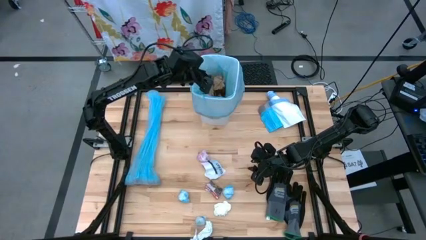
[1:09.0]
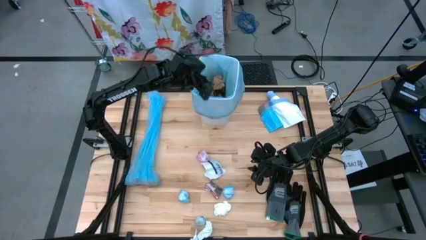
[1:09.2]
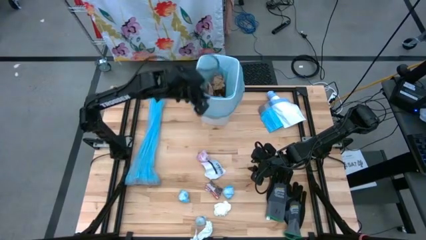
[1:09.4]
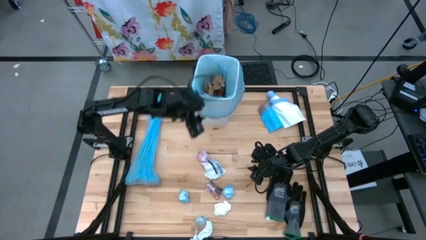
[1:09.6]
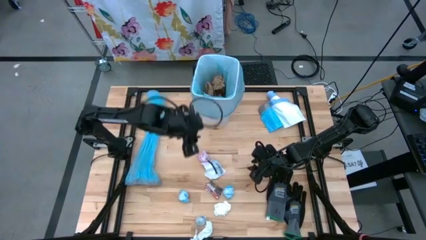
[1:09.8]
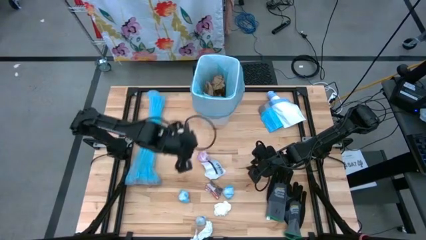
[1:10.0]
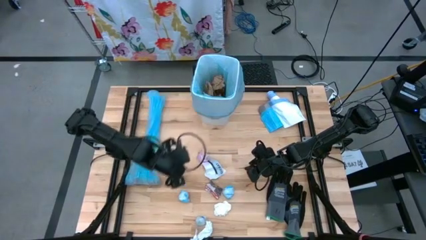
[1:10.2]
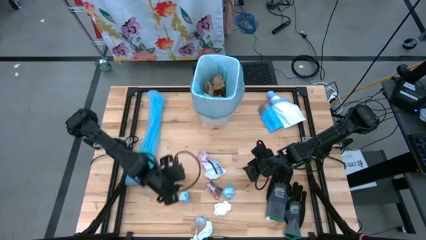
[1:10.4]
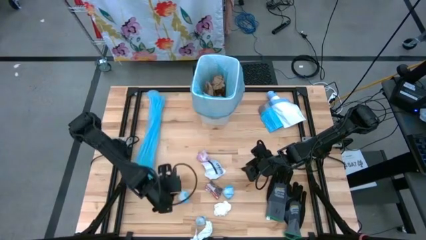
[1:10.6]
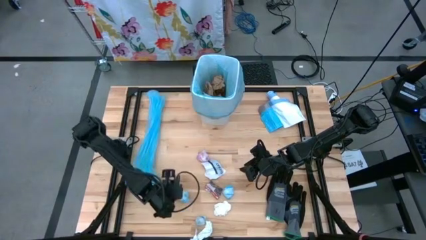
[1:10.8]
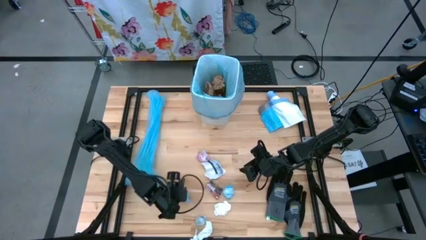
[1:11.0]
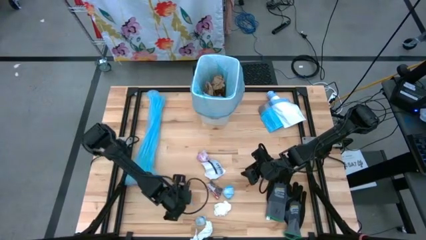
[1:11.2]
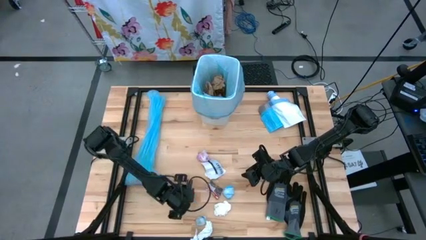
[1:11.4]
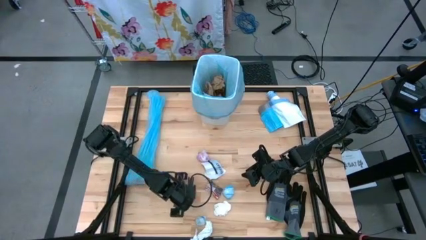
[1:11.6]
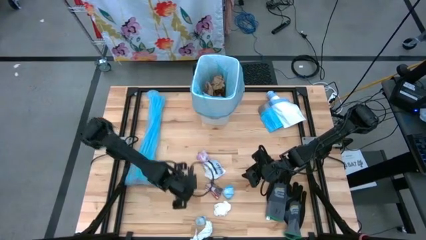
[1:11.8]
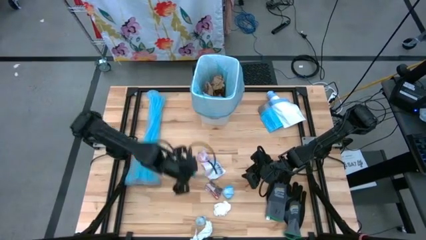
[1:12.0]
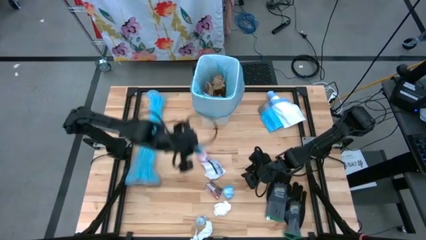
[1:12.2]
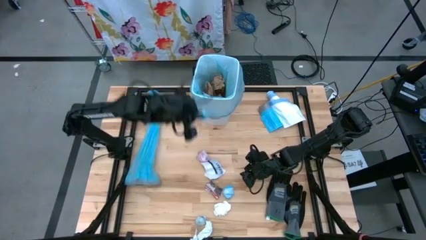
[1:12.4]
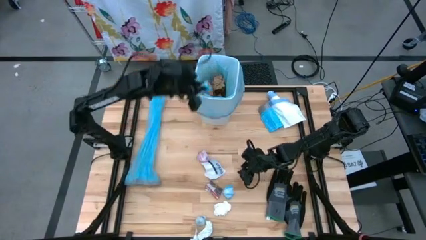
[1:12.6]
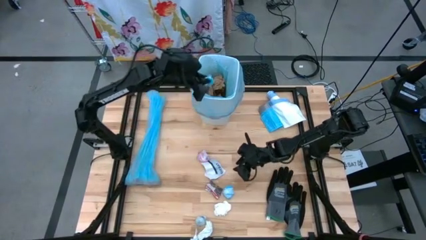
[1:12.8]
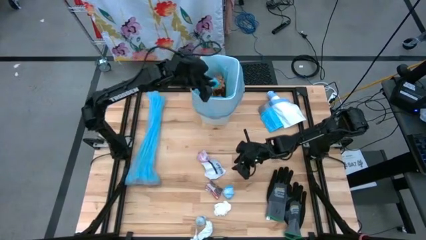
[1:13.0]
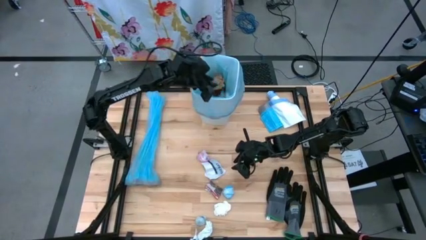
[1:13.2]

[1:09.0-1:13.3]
Task: place trash/remove bag and relplace
Put the blue plastic into the blue trash bag inside the white trash bin

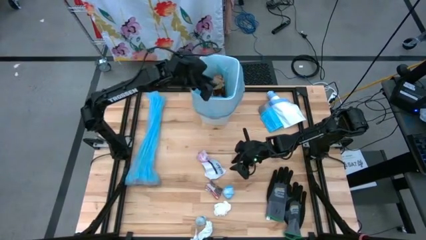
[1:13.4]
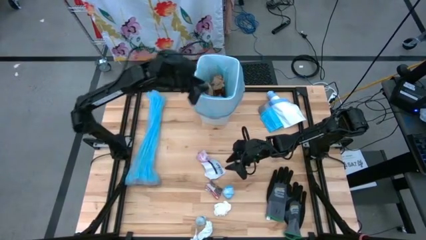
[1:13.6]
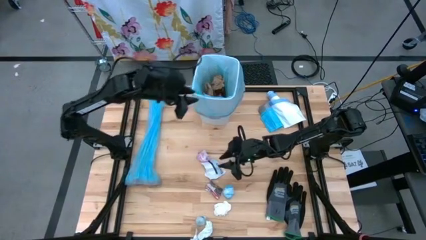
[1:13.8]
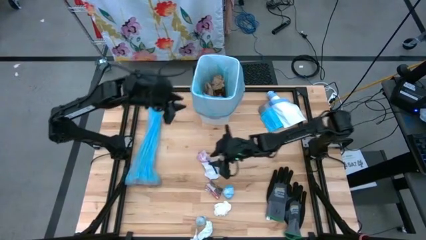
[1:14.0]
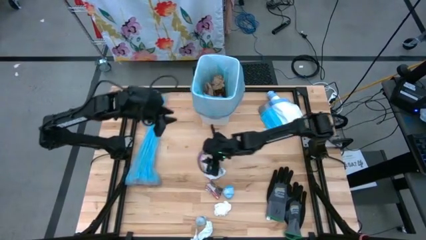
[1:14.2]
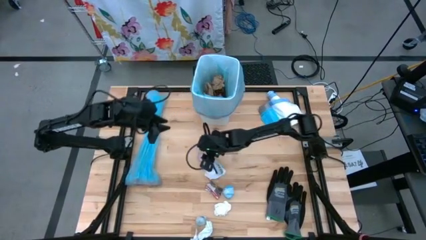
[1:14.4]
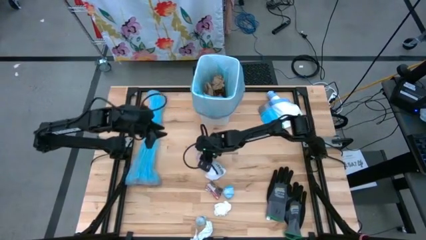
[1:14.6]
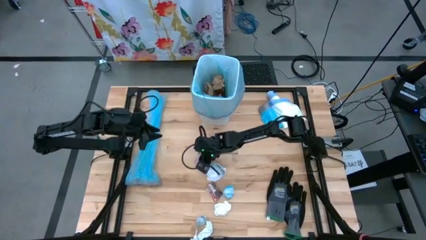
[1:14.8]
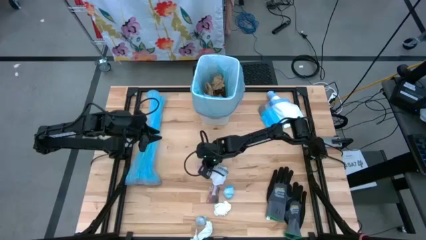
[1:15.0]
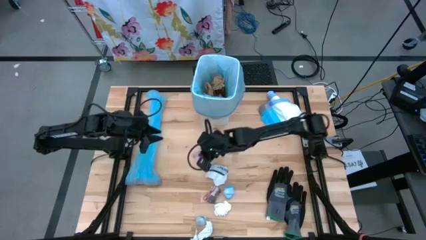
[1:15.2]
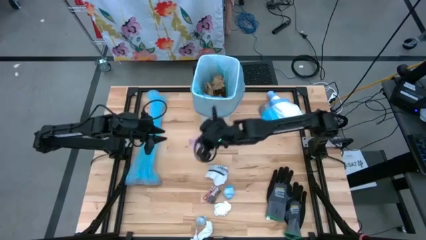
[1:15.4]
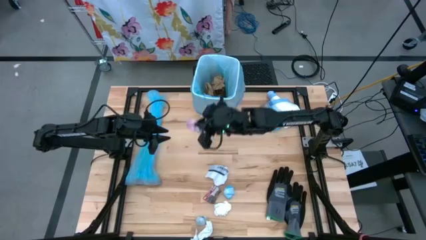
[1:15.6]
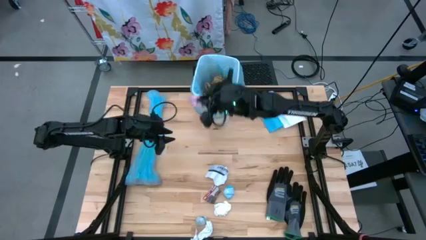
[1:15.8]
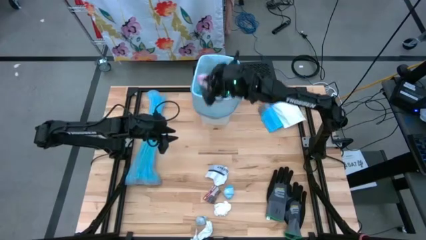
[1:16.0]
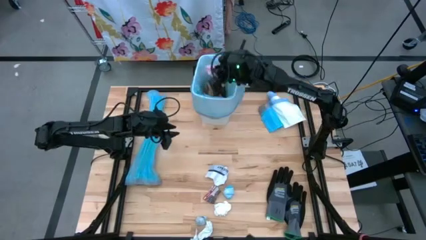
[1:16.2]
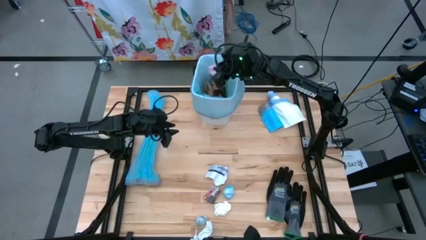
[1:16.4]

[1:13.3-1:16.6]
Put the pink plastic into the blue trash bag inside the white trash bin

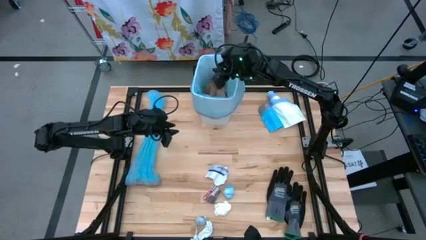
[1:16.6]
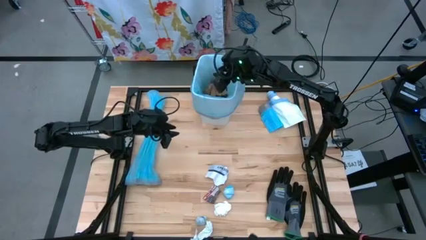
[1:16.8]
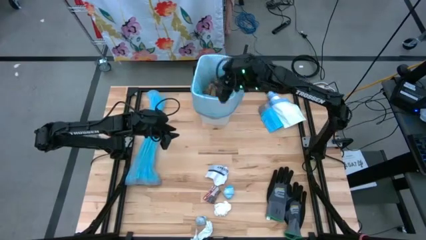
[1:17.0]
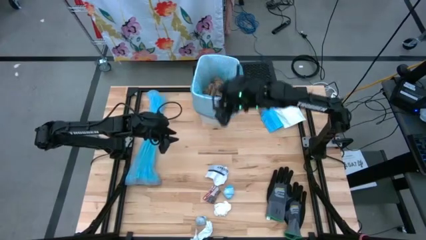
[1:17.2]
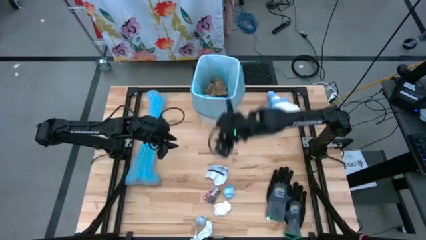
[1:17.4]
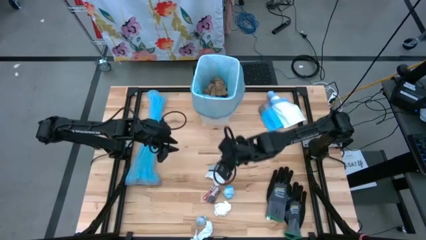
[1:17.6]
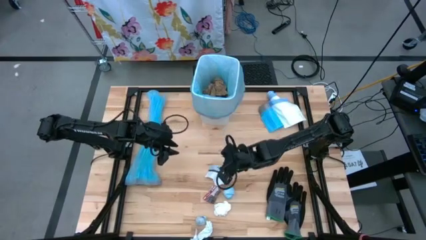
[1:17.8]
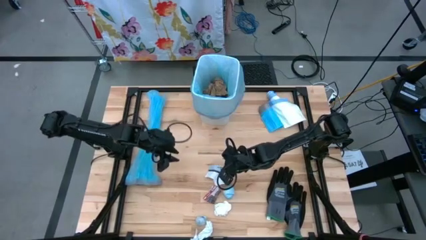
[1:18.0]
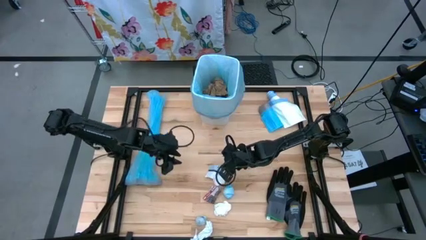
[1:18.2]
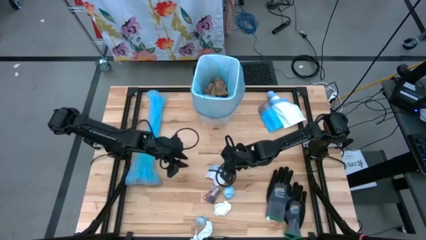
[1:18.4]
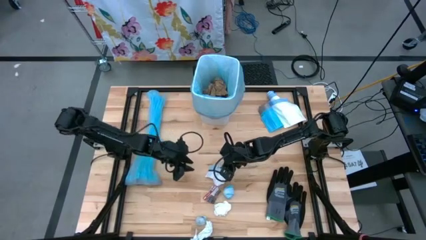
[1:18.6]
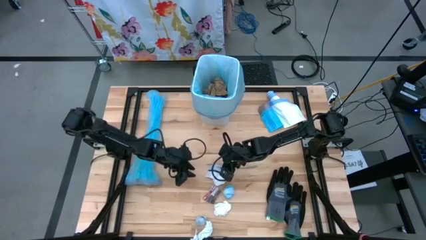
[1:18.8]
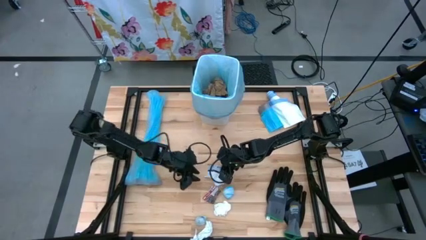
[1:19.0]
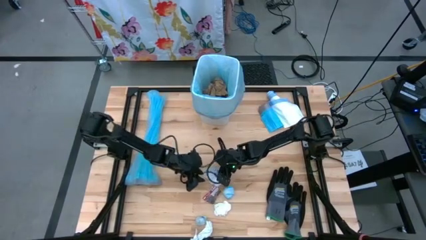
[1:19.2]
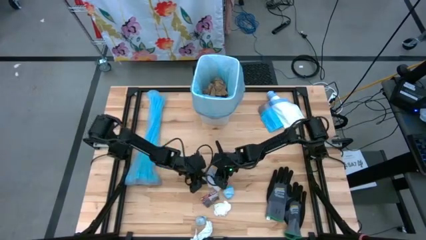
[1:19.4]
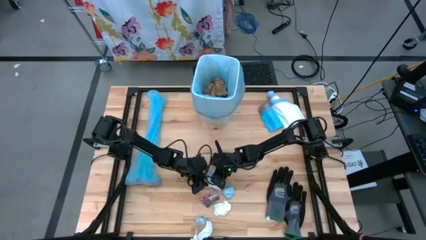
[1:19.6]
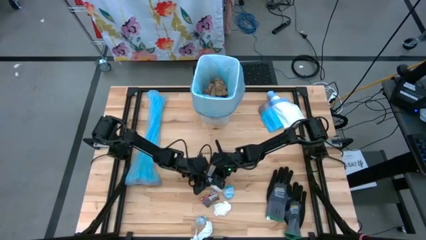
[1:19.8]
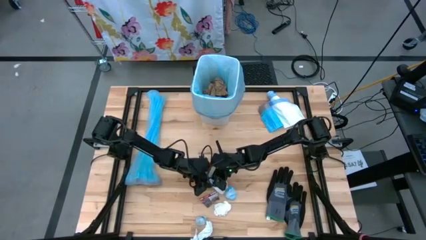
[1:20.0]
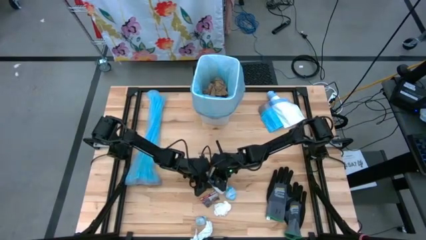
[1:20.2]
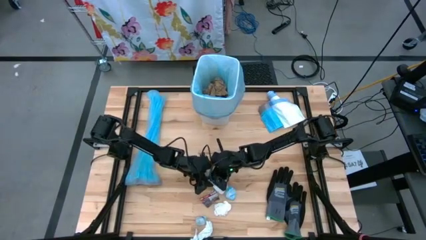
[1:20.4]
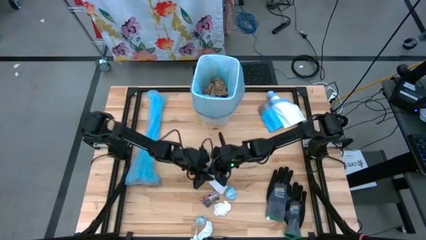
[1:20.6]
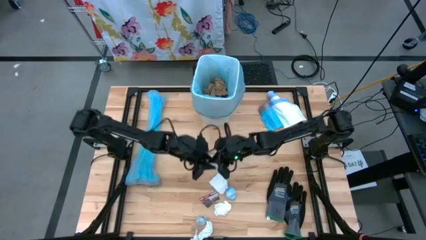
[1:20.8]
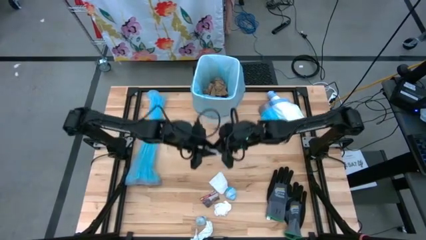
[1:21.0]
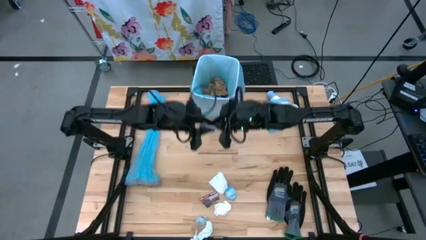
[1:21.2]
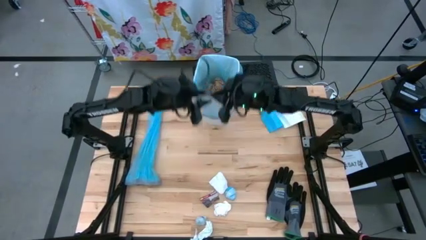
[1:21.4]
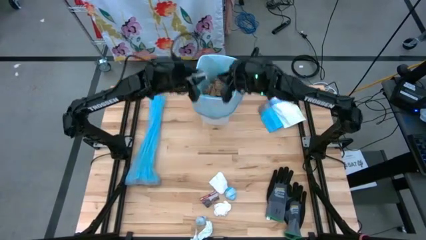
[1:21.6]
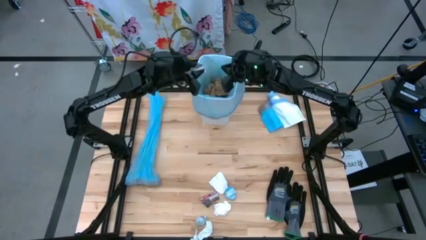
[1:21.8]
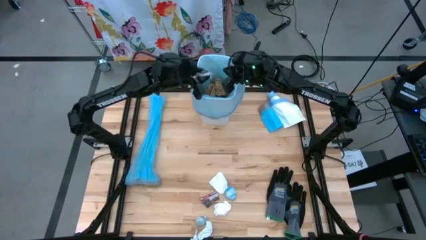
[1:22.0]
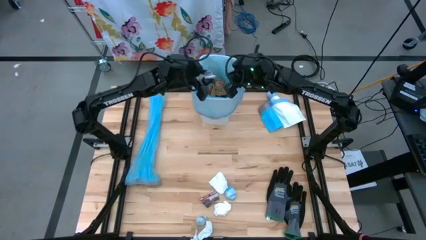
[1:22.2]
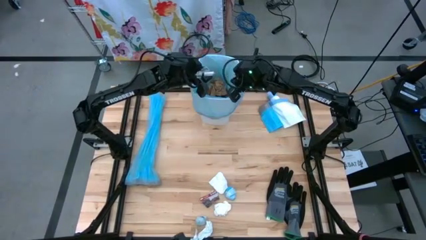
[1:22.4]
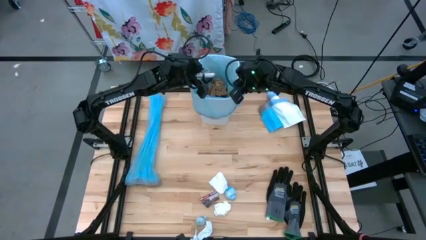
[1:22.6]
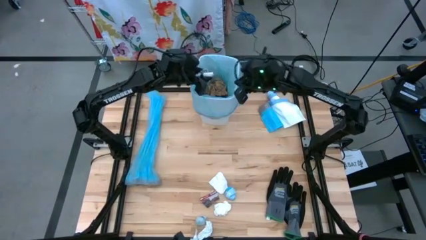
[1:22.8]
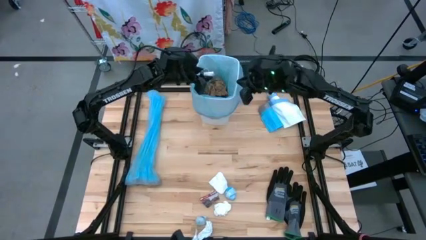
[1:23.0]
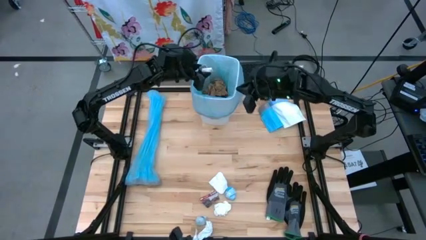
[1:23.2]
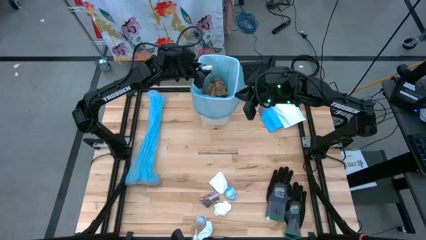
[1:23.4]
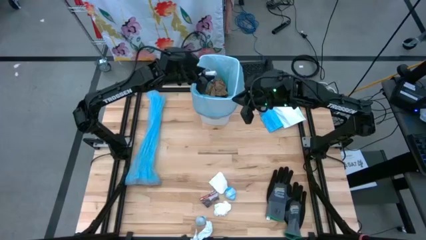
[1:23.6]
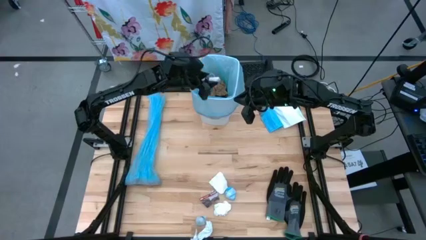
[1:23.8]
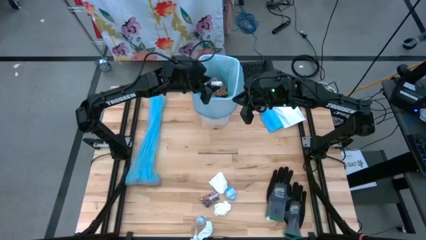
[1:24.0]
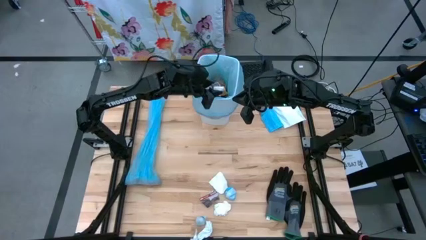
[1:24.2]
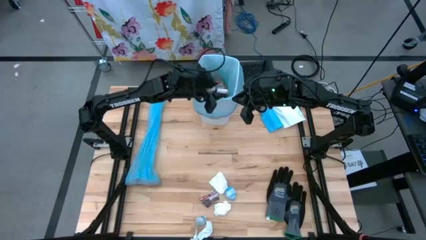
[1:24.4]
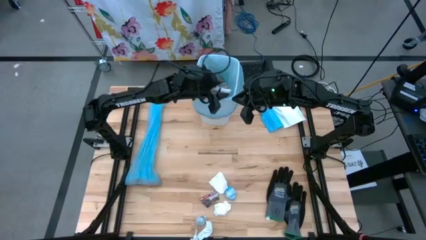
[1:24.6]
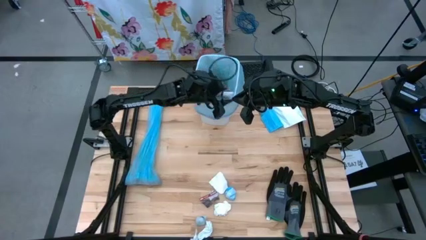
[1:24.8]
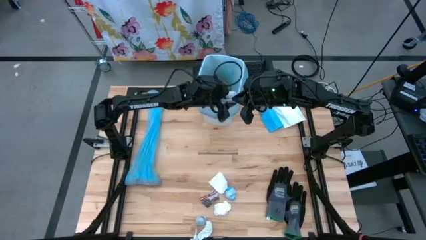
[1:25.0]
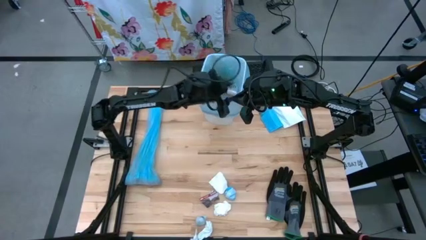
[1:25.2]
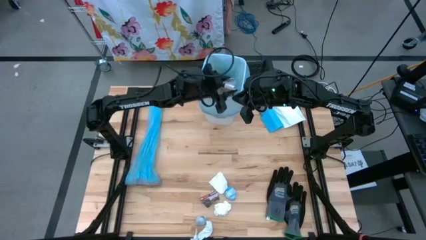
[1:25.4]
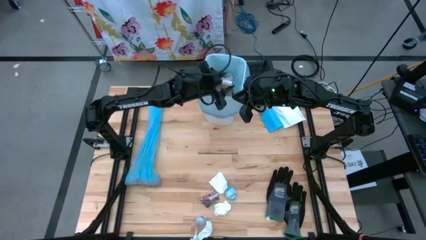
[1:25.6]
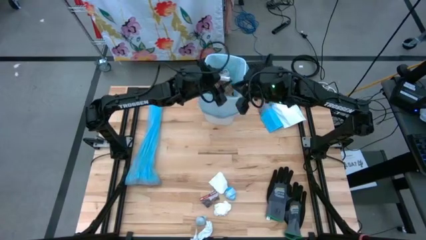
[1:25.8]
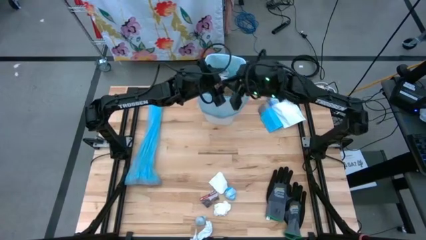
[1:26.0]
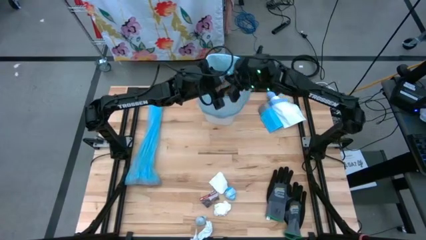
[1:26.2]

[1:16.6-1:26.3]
Put the white paper into the blue trash bag inside the white trash bin
